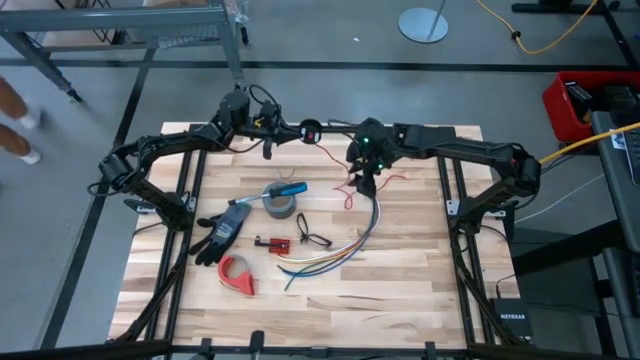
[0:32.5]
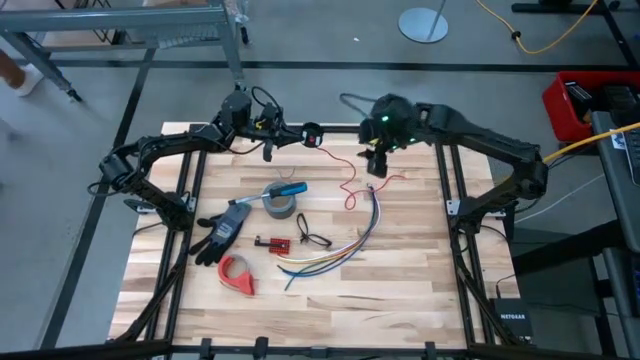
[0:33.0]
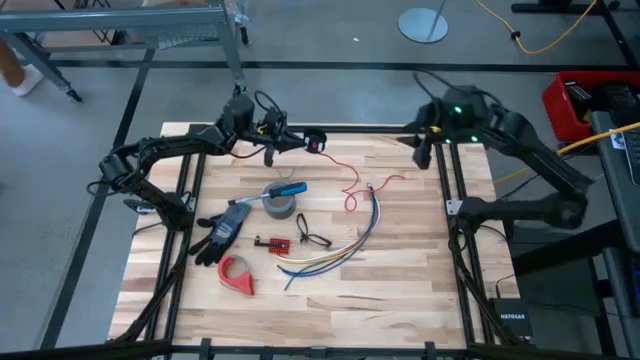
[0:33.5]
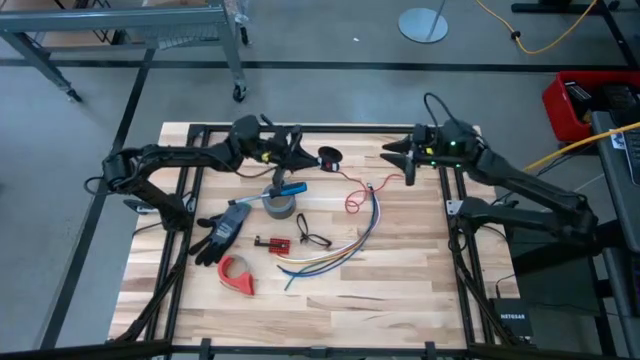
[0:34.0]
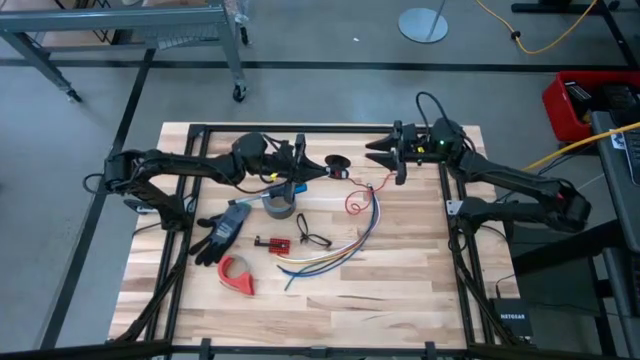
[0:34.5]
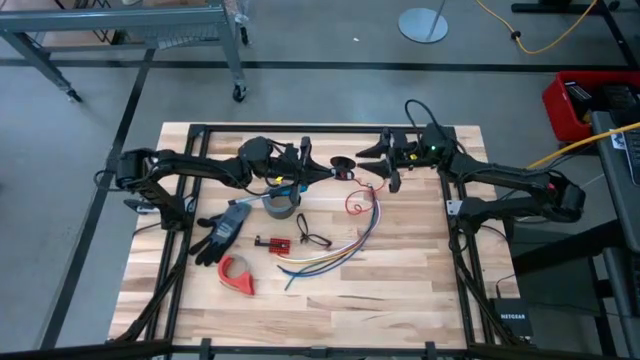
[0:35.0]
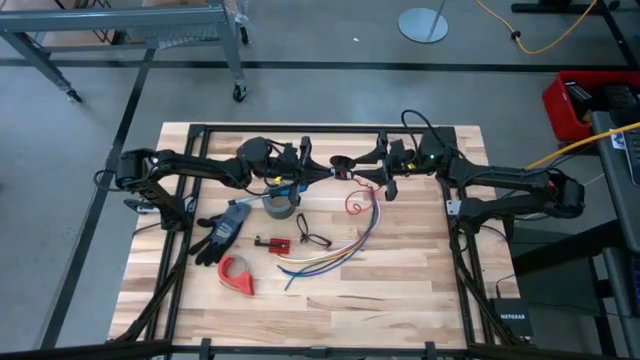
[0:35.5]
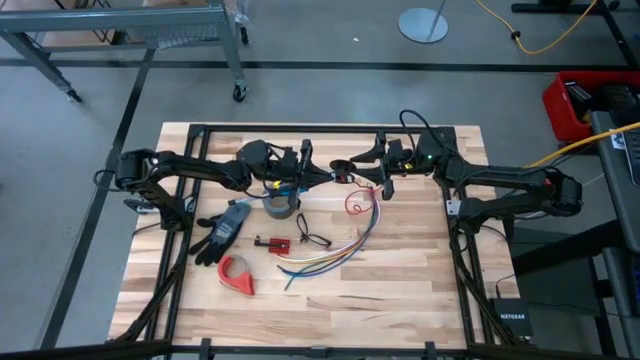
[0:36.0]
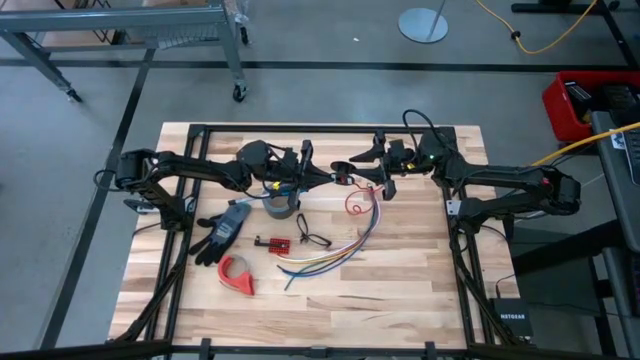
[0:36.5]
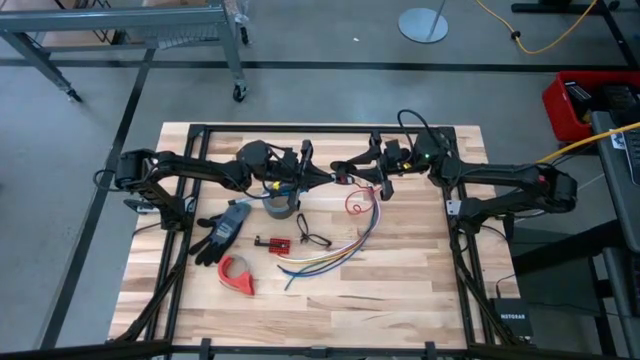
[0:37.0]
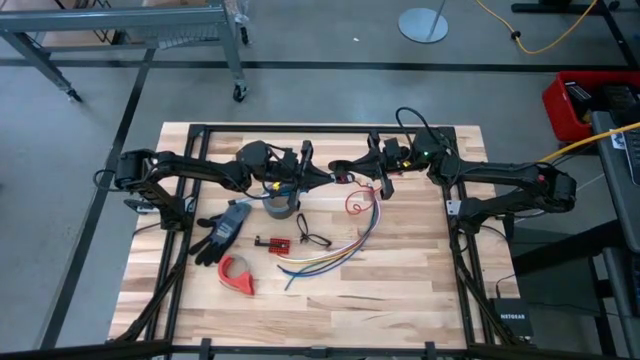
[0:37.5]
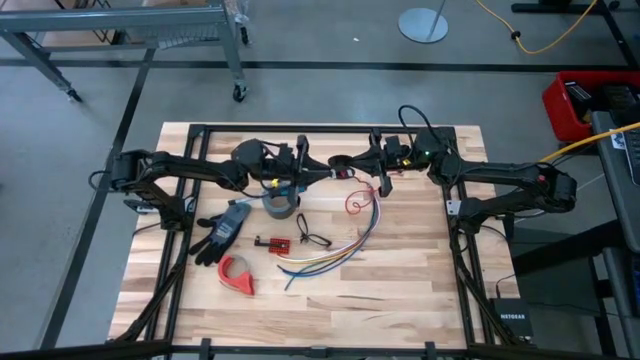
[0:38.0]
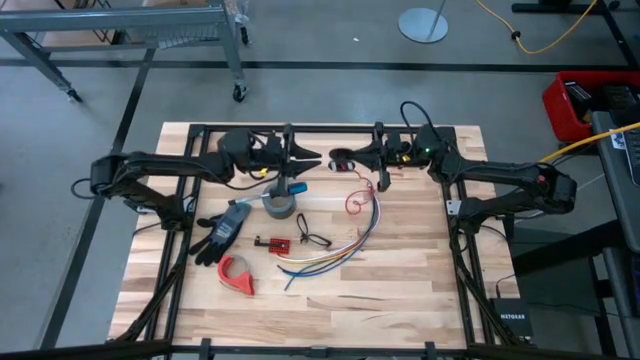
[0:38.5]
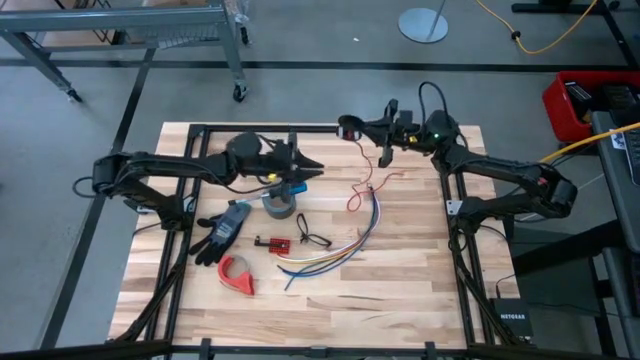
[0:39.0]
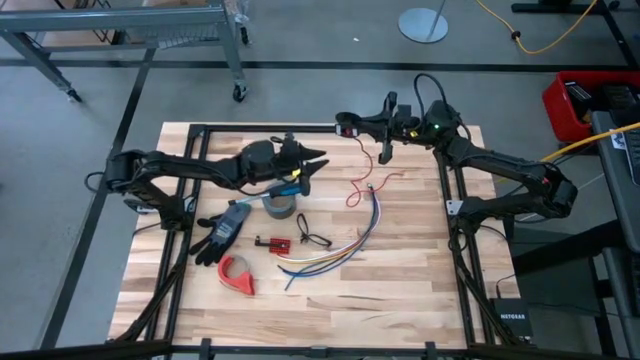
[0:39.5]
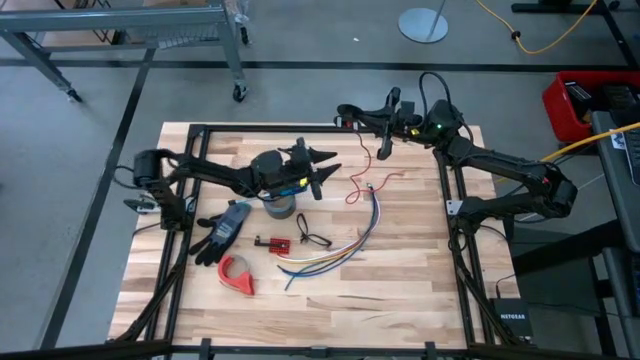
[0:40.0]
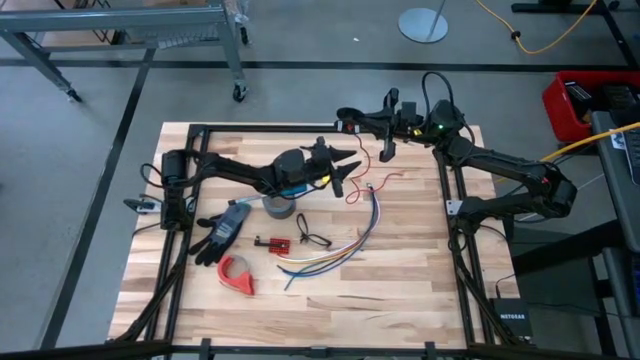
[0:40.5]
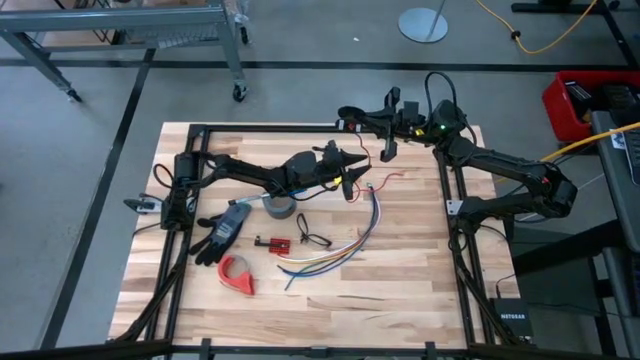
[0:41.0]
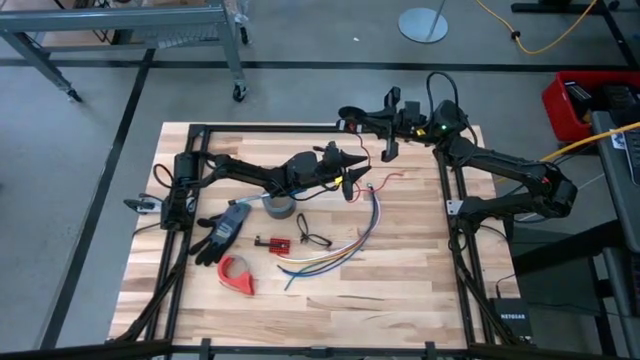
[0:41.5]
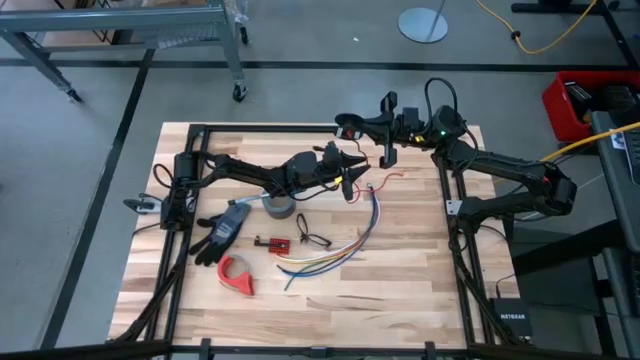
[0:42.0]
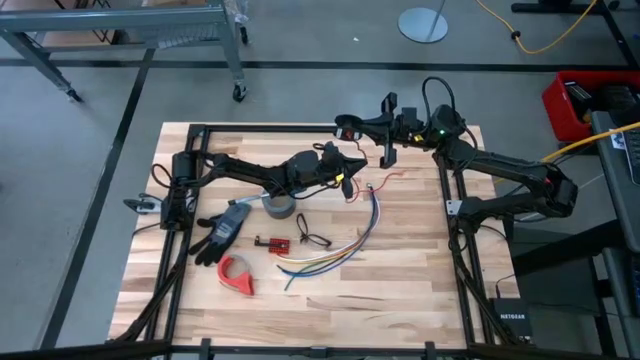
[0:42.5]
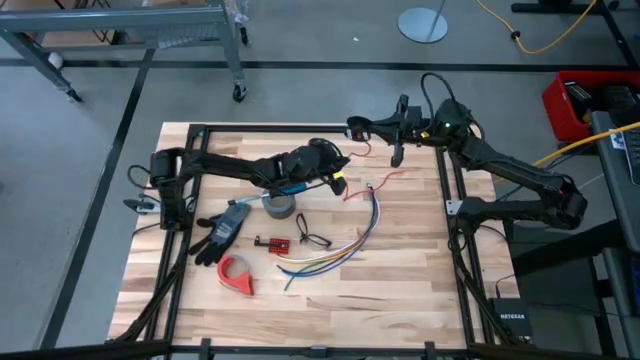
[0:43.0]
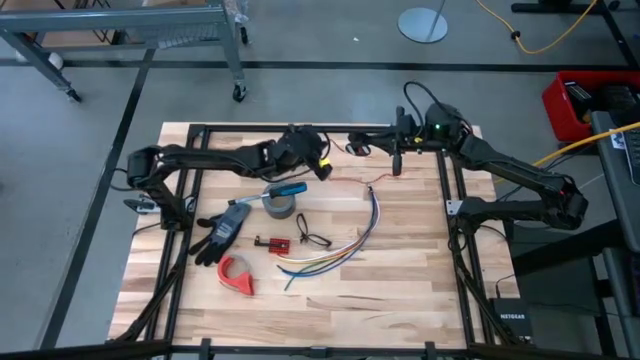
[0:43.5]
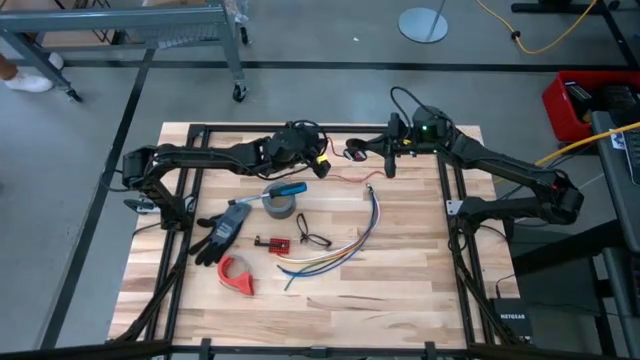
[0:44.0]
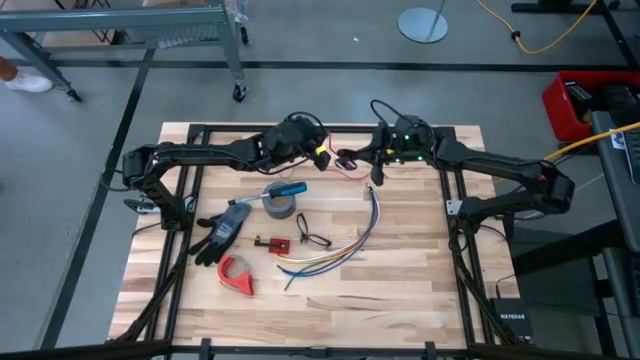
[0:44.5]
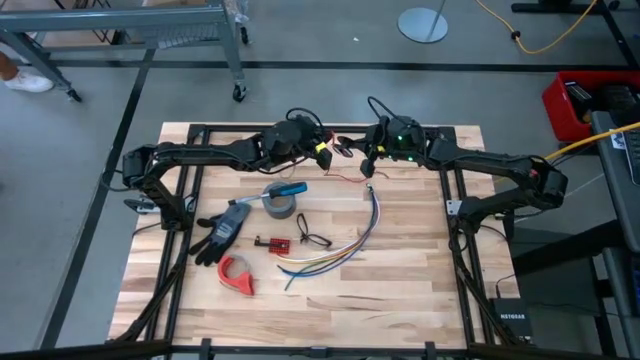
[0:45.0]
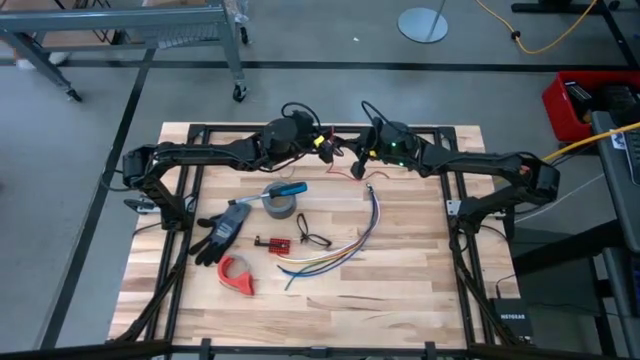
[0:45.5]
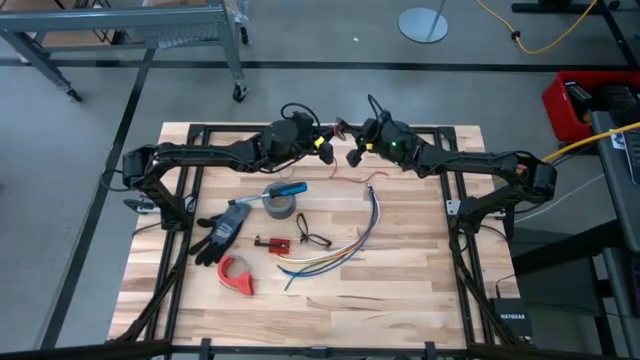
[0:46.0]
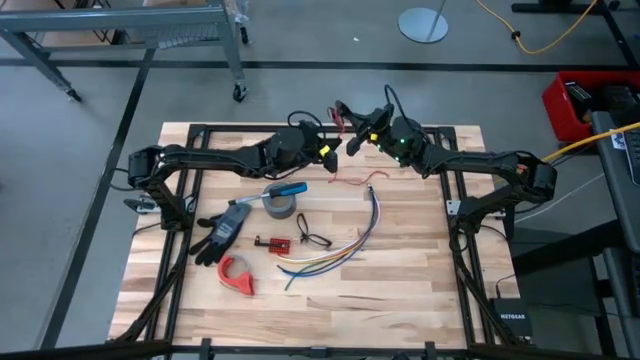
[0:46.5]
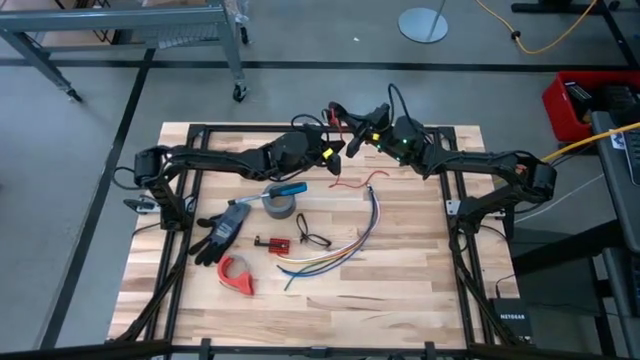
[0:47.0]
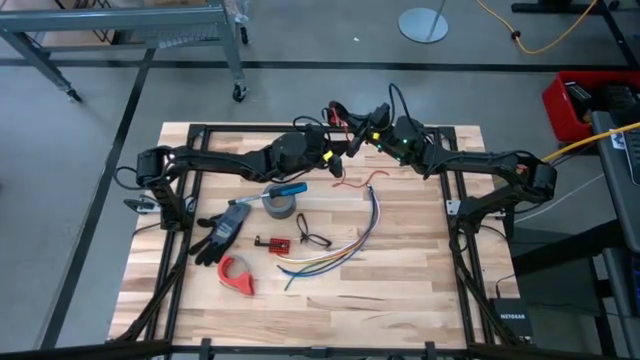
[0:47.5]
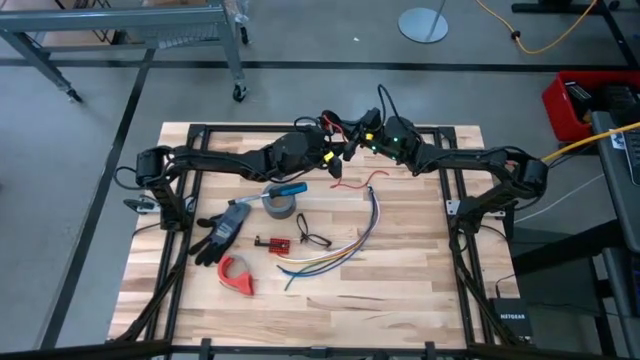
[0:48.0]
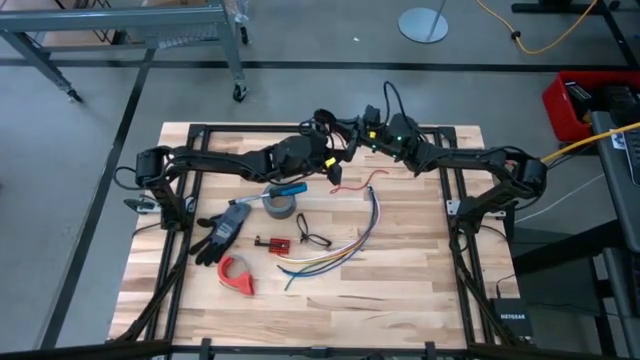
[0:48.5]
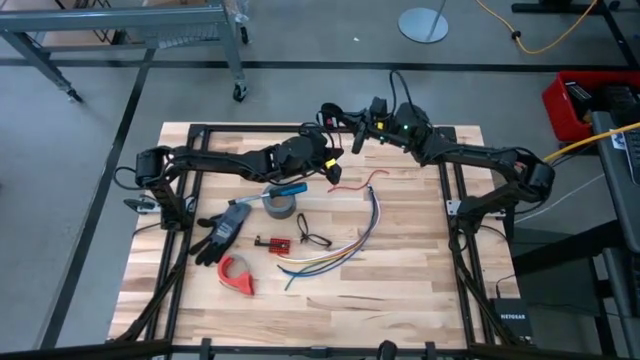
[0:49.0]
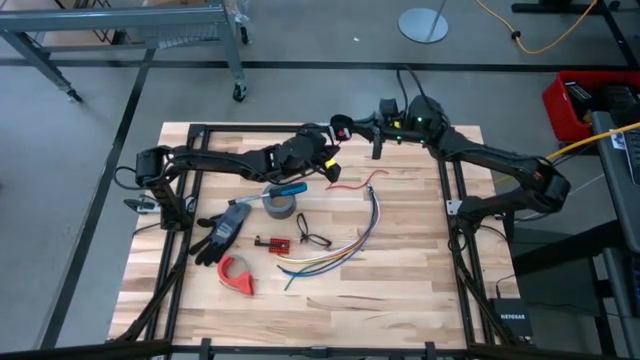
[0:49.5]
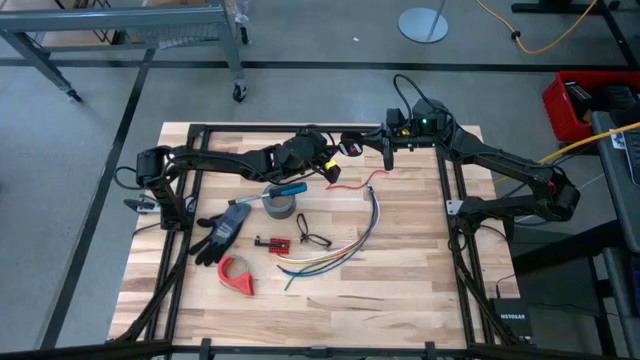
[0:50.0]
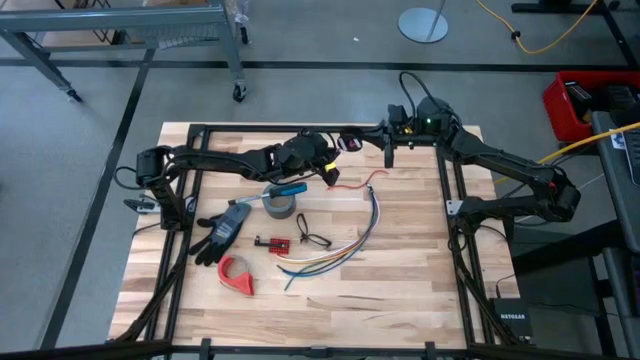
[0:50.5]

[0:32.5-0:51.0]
Task: Coil cords
Coil the red wire on the spool

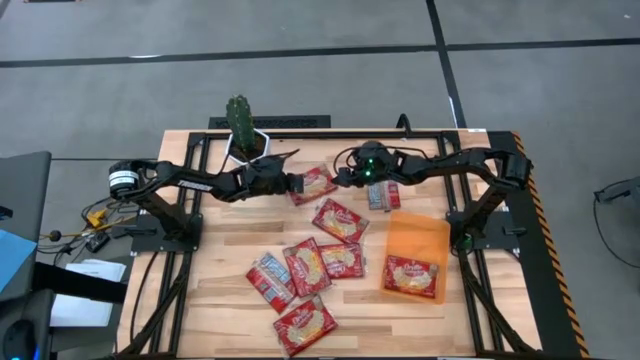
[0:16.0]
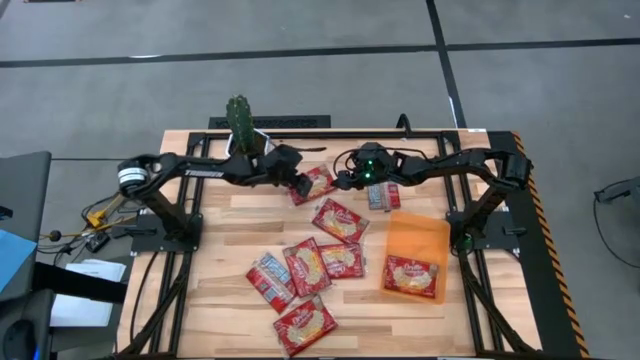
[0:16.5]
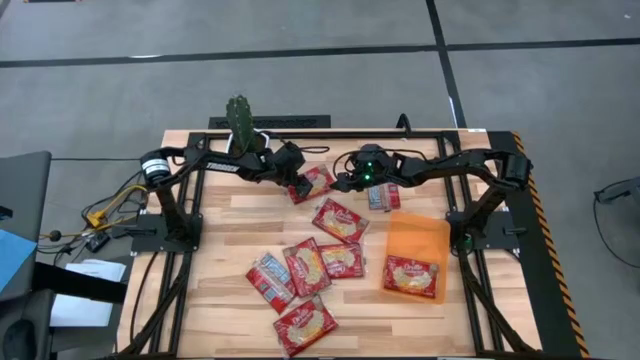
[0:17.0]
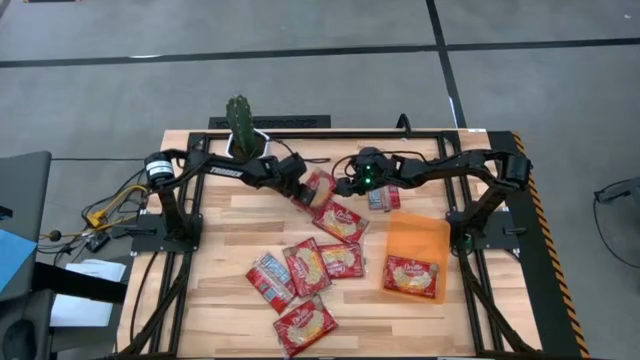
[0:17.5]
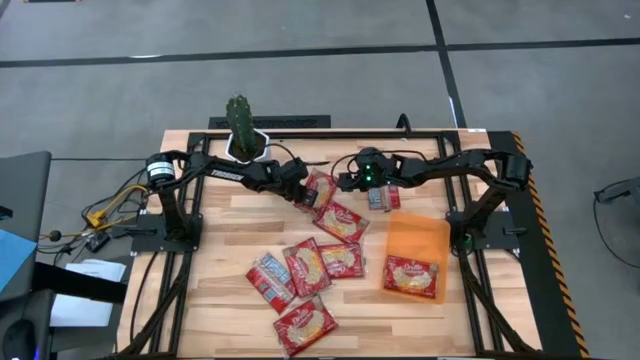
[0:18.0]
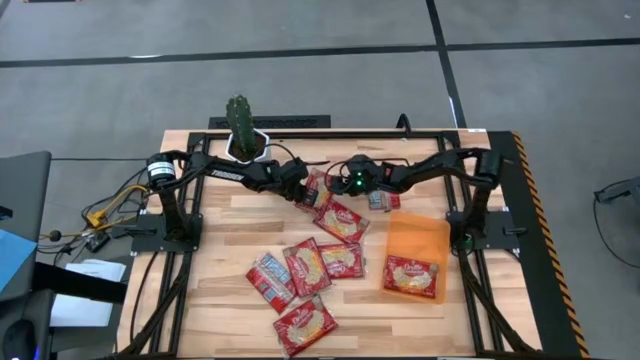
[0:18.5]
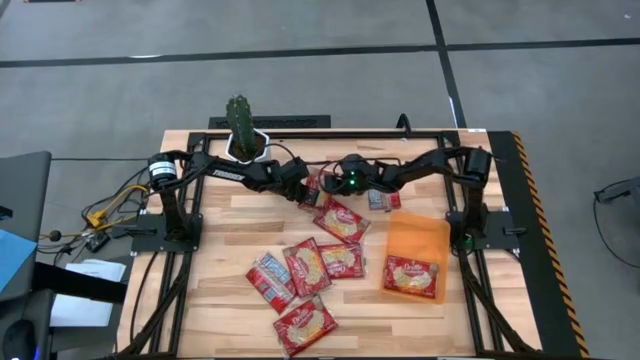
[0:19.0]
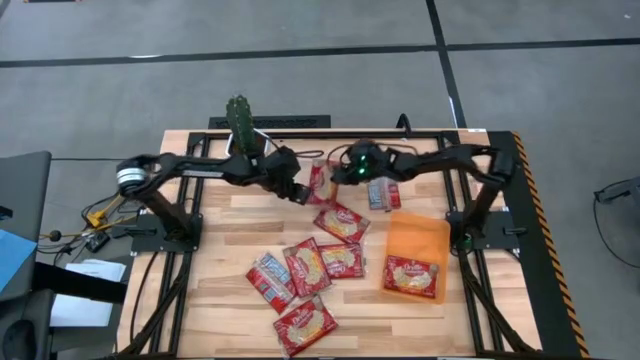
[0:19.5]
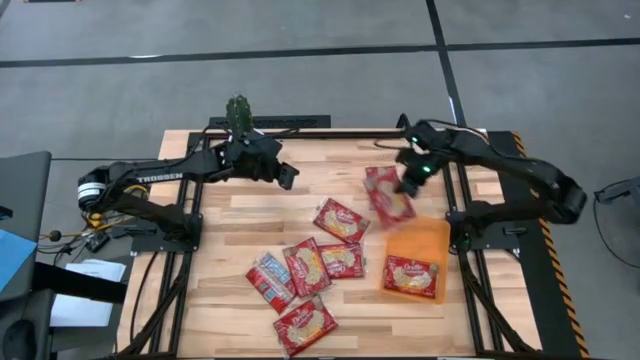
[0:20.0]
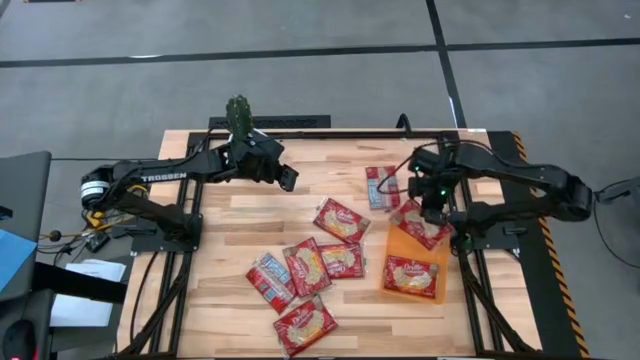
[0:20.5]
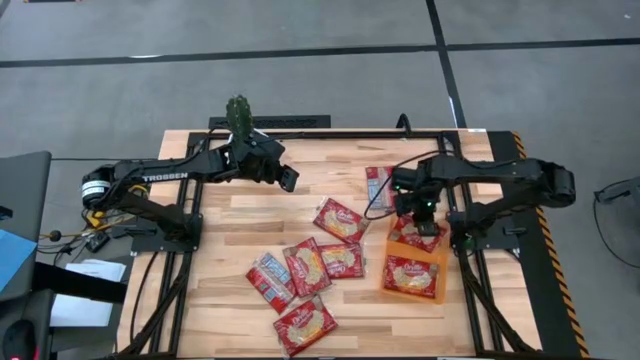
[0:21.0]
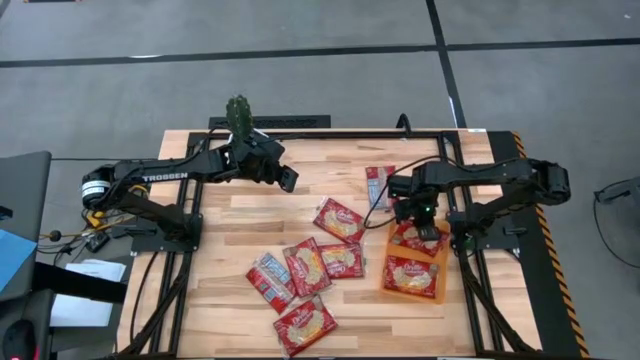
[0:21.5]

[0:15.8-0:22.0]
Task: Sort popcorn bags into baskets
Put the popcorn bag into the orange bin
